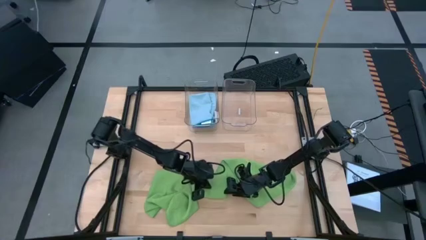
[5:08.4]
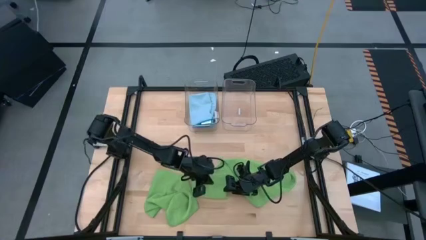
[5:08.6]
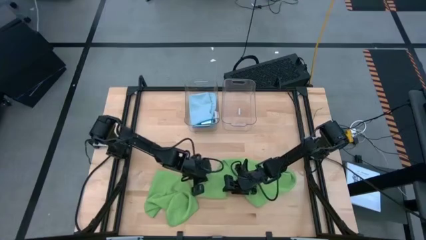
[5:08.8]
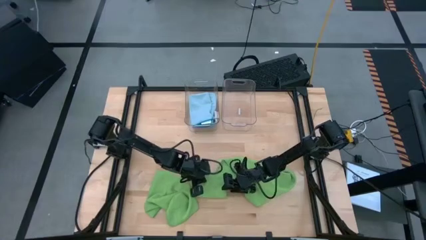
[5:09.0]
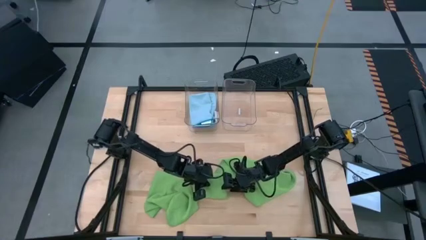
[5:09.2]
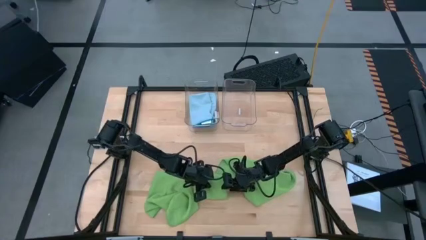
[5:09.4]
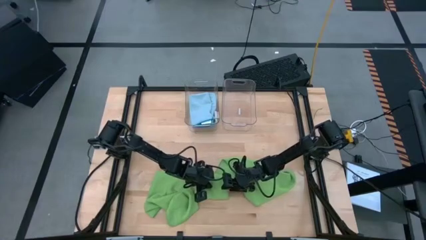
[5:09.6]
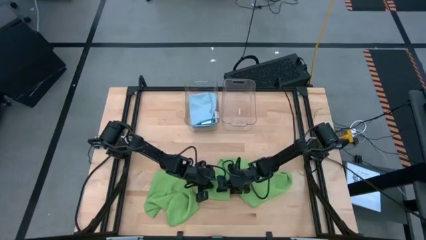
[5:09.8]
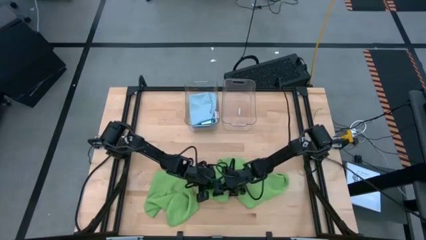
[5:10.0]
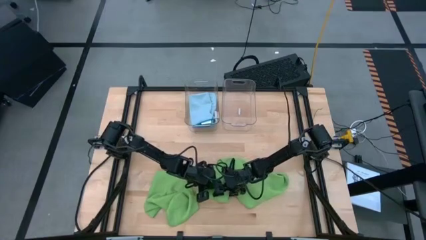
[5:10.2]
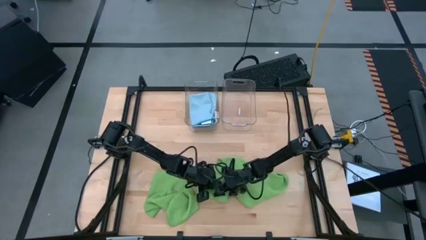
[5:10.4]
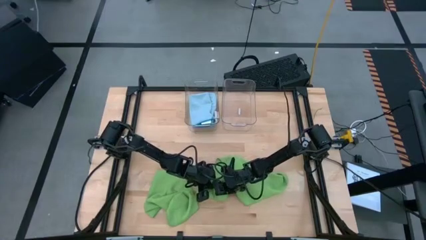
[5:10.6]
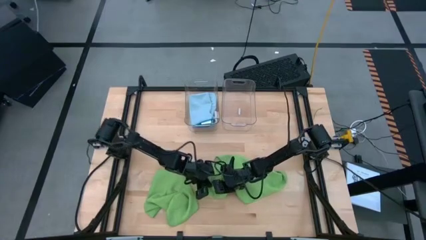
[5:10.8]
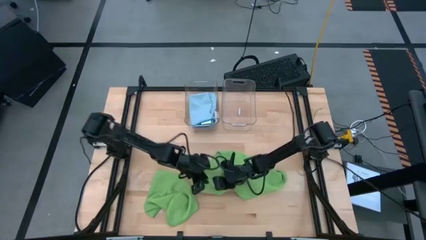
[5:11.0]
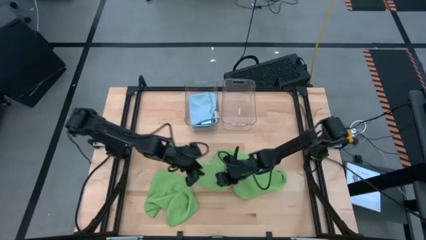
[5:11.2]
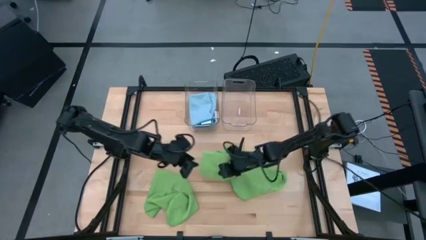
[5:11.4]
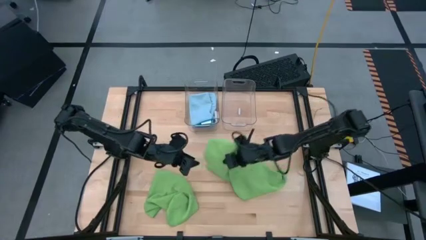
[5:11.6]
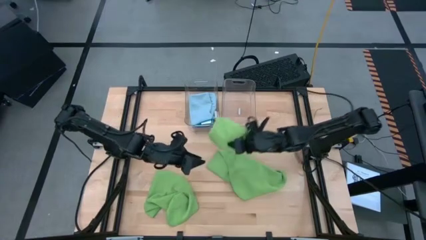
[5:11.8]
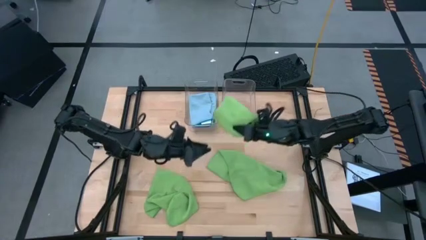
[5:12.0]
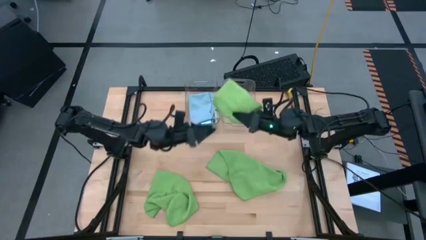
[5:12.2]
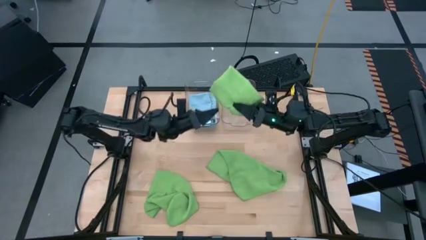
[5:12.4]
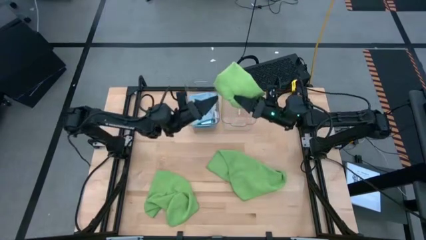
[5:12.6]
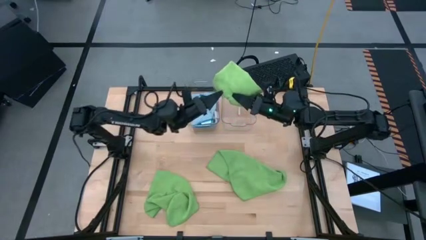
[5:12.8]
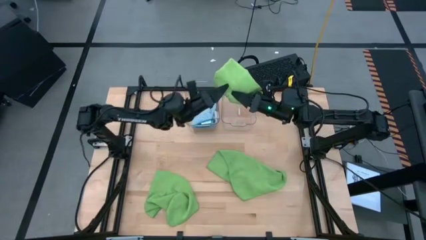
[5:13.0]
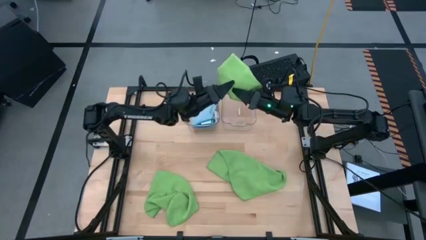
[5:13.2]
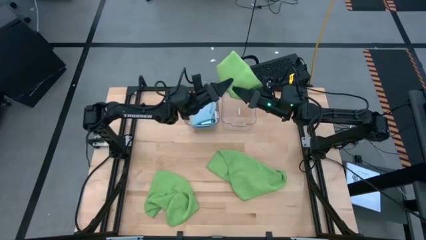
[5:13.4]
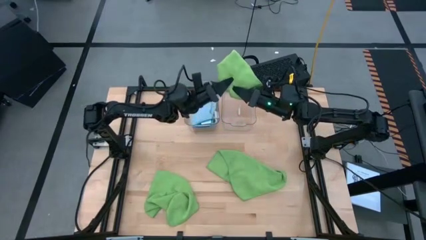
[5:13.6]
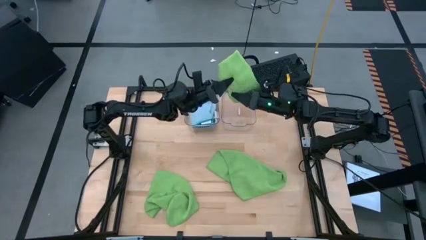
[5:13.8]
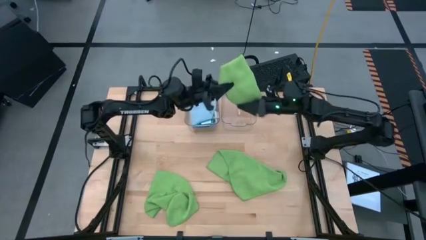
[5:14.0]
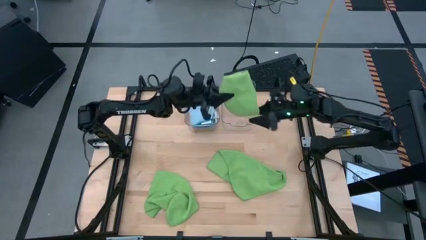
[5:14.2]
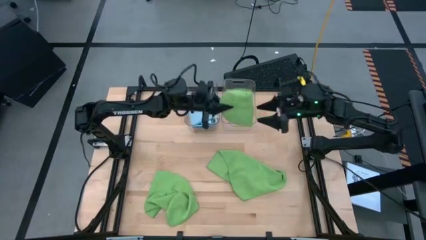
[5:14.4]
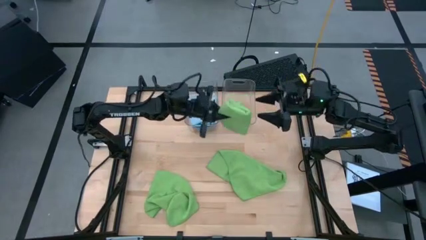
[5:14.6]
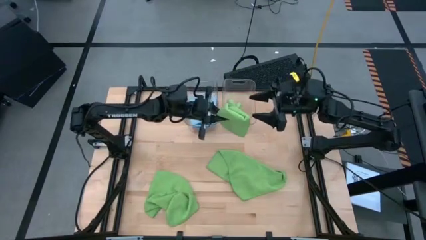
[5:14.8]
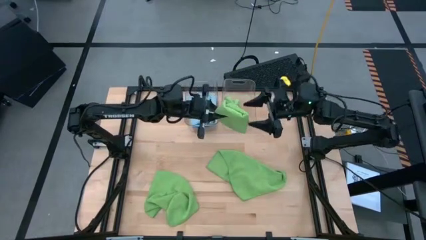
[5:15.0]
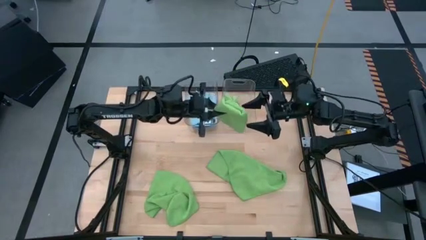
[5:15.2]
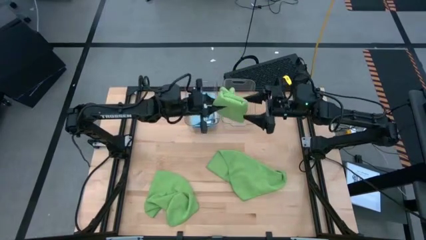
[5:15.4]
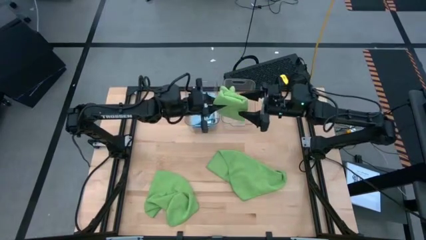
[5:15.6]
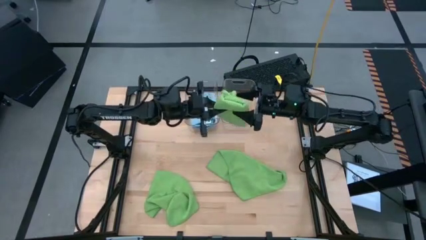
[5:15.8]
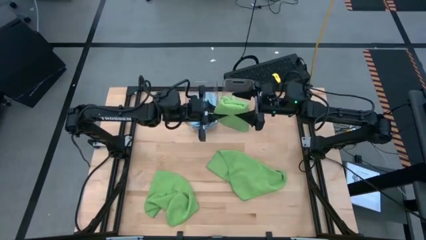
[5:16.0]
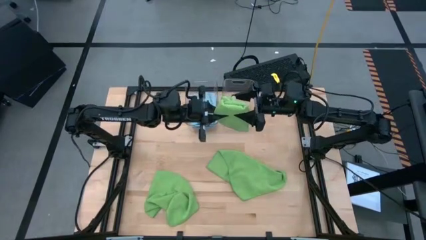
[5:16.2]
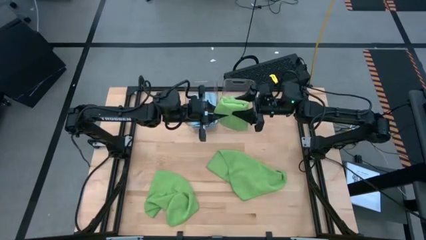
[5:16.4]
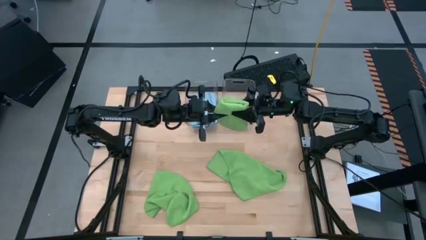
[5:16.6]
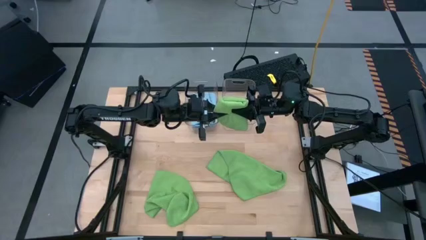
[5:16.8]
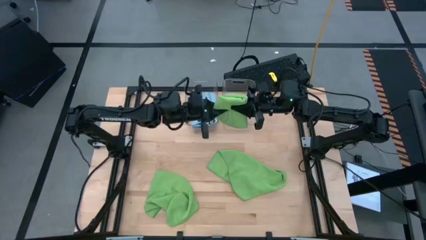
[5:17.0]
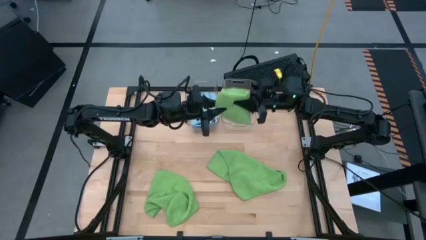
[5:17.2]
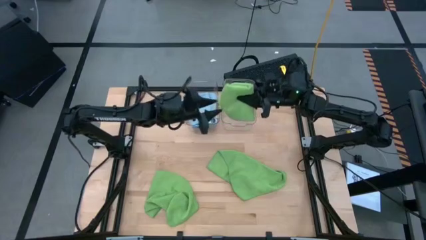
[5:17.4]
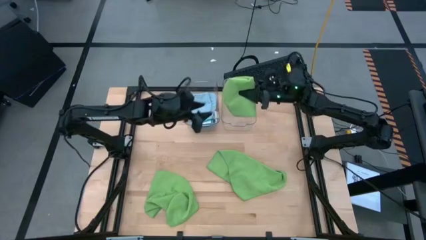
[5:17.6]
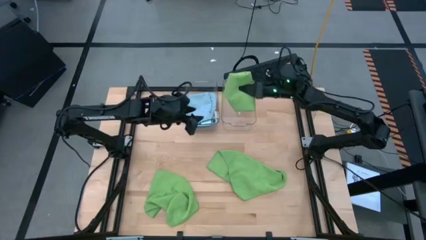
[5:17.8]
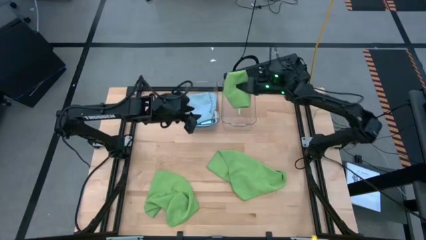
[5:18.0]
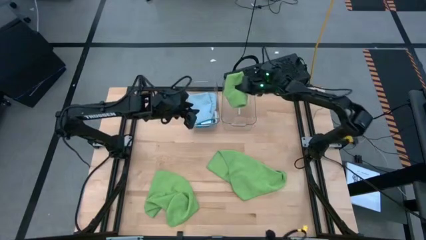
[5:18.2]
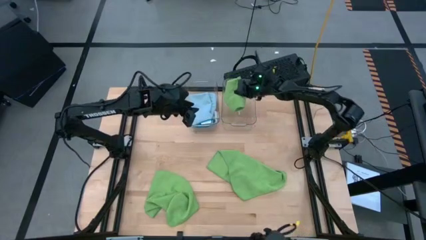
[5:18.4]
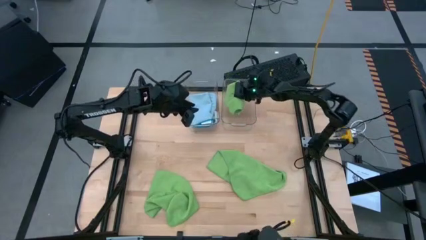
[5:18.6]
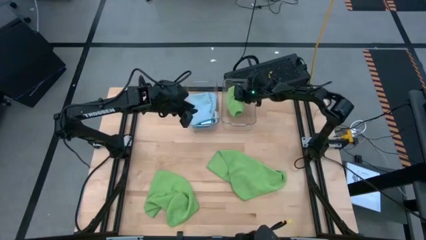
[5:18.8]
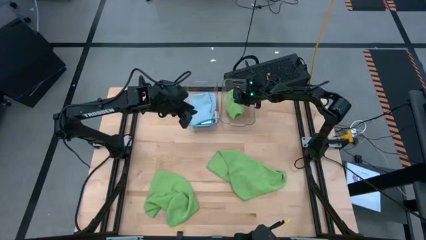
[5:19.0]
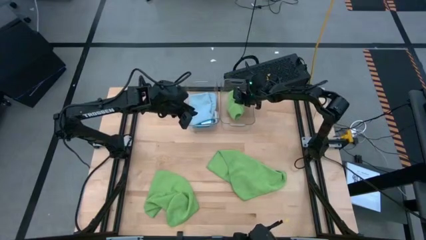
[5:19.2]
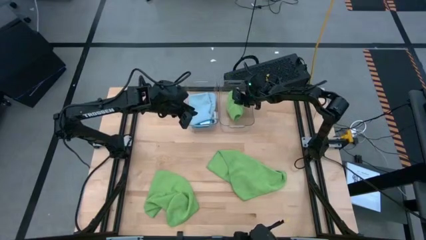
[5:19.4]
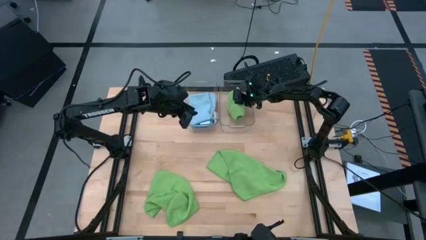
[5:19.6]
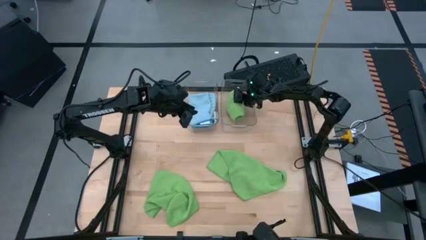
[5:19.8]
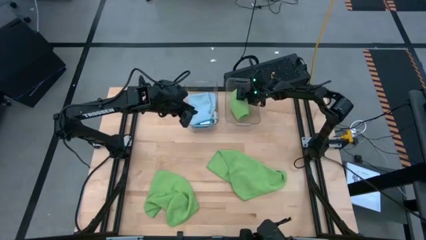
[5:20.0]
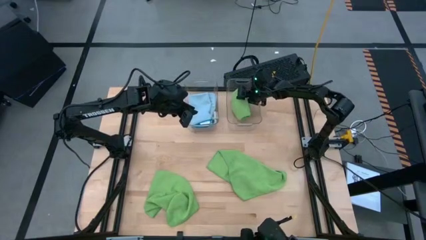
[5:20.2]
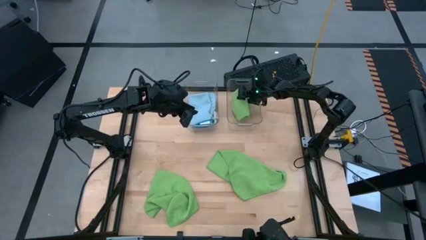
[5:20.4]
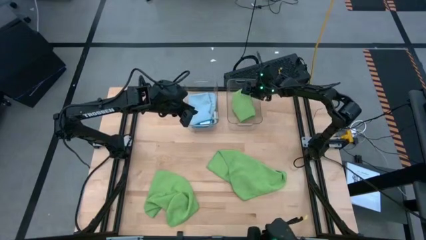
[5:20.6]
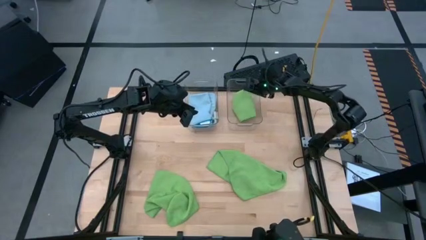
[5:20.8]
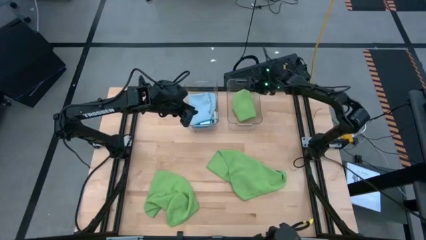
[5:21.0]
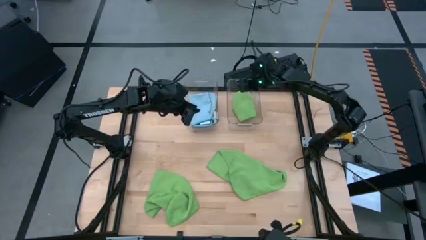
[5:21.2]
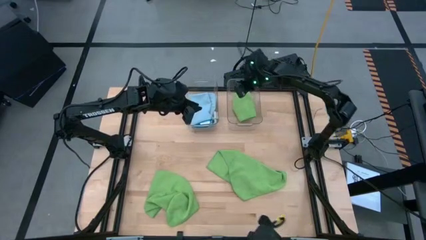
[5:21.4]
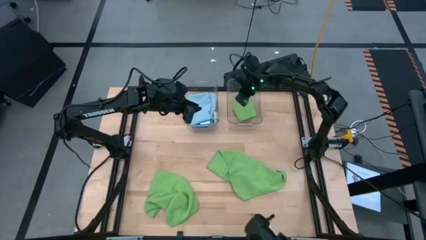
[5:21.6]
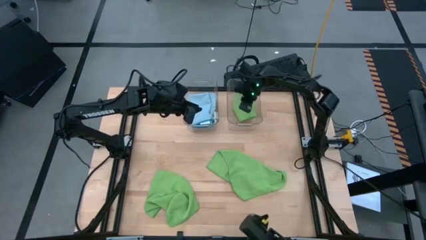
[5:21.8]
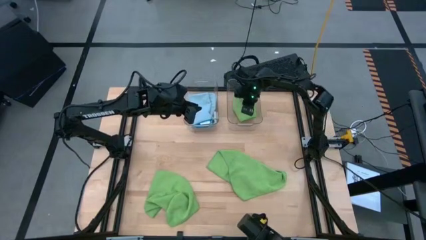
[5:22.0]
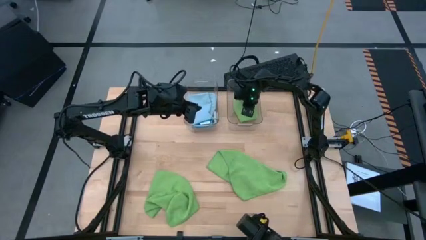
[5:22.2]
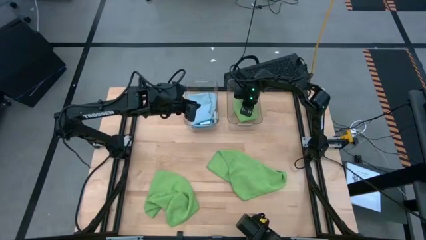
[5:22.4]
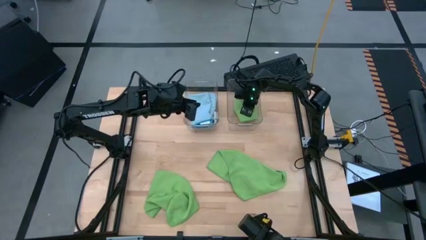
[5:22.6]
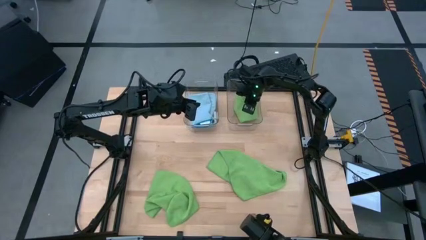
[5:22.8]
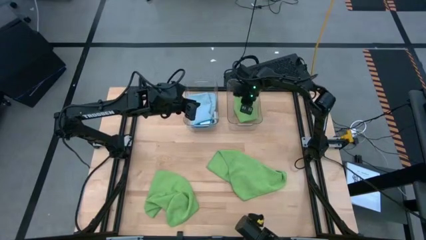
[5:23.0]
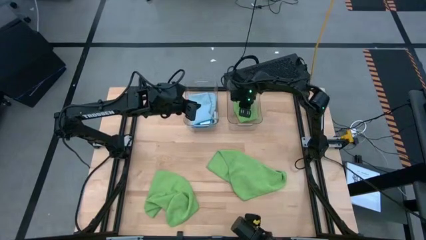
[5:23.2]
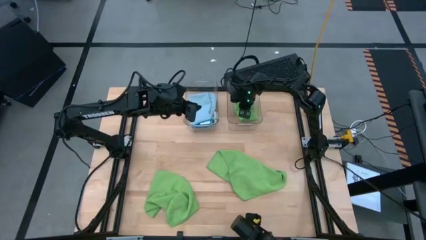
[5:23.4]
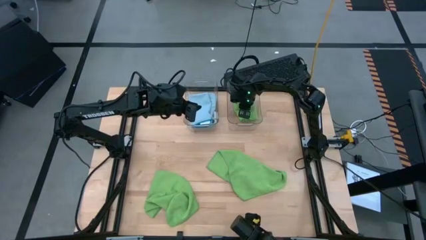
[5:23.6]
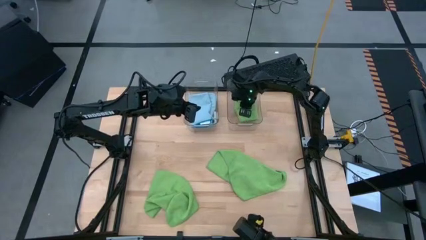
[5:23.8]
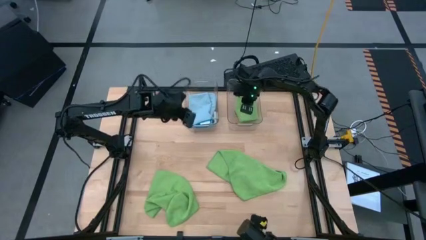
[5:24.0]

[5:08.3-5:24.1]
Task: Fold microfiber towels
Put the green folded microfiber towel into the right transparent bin
